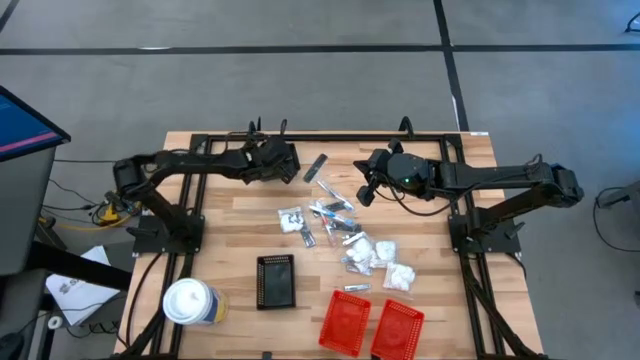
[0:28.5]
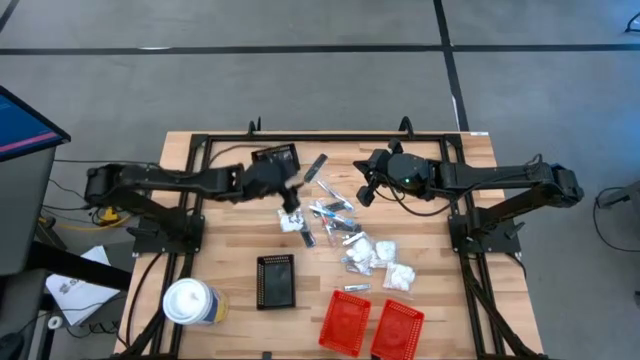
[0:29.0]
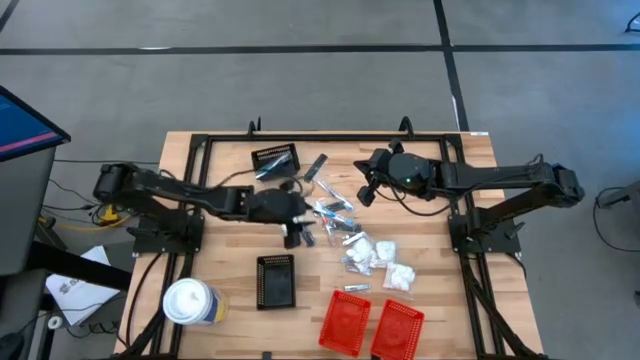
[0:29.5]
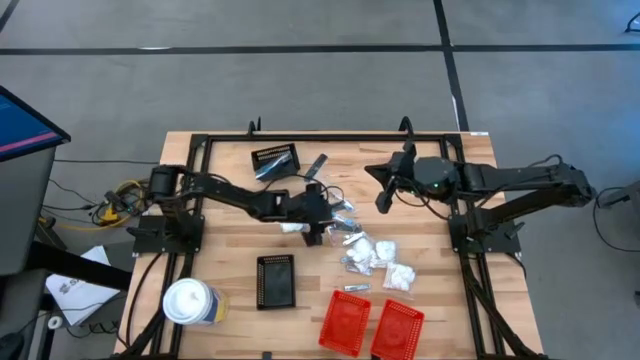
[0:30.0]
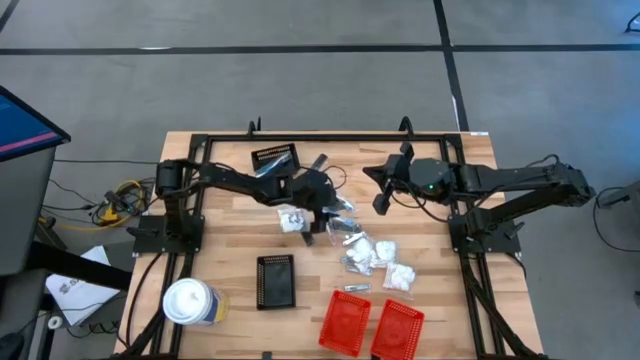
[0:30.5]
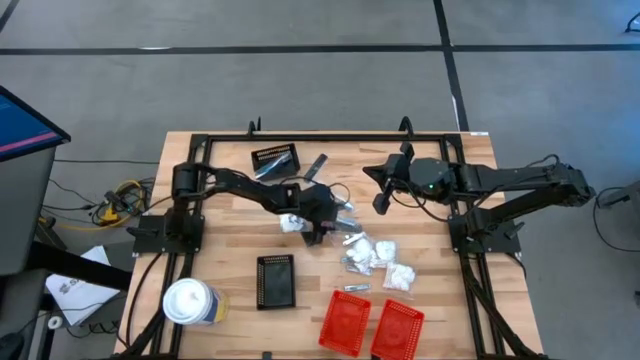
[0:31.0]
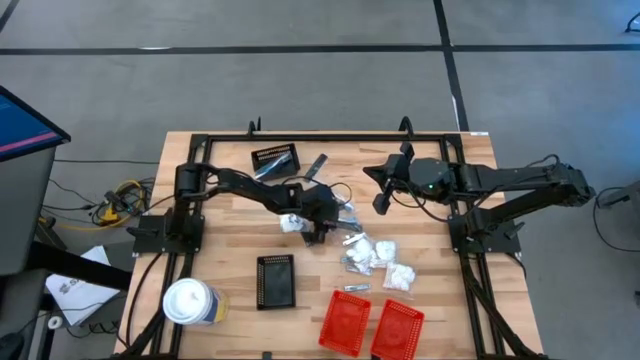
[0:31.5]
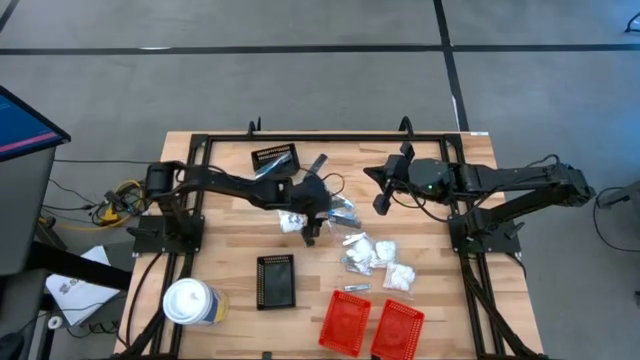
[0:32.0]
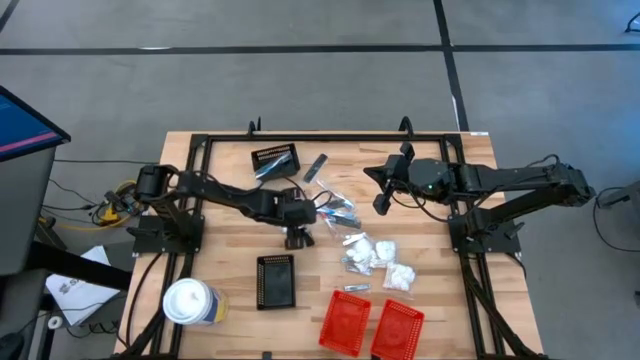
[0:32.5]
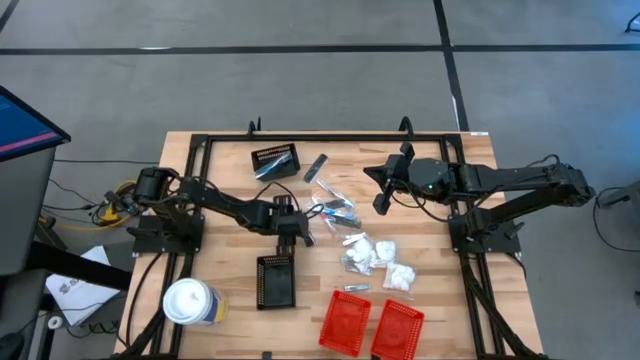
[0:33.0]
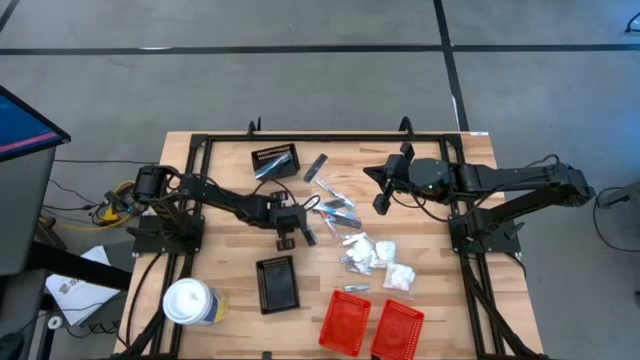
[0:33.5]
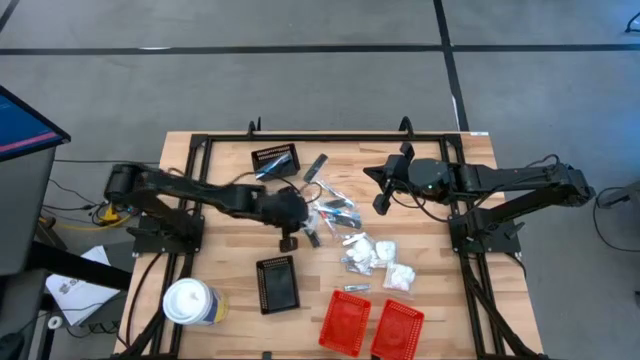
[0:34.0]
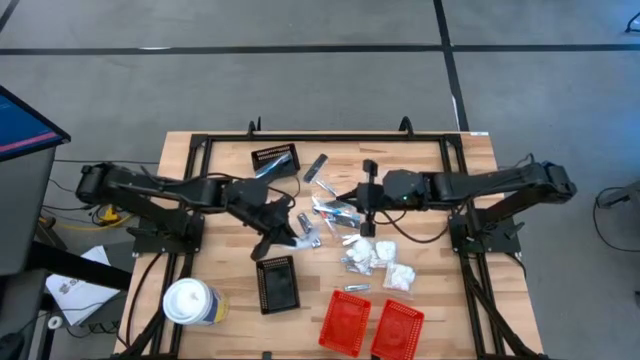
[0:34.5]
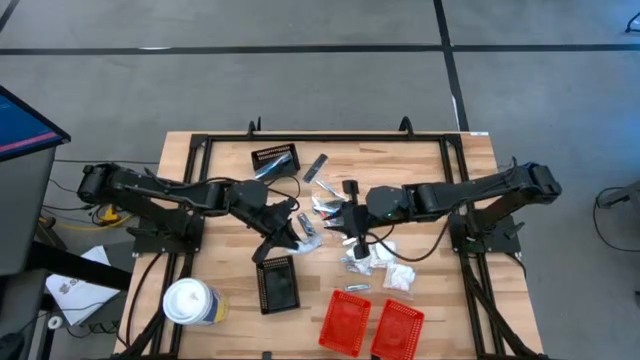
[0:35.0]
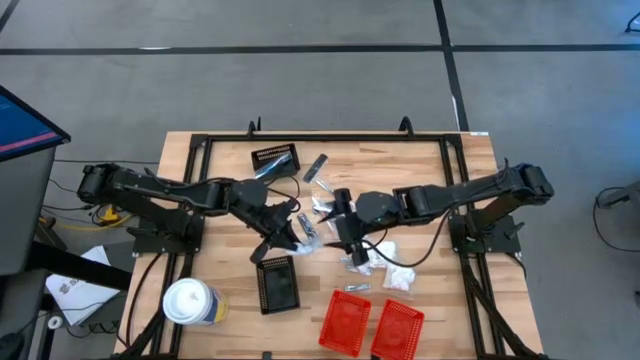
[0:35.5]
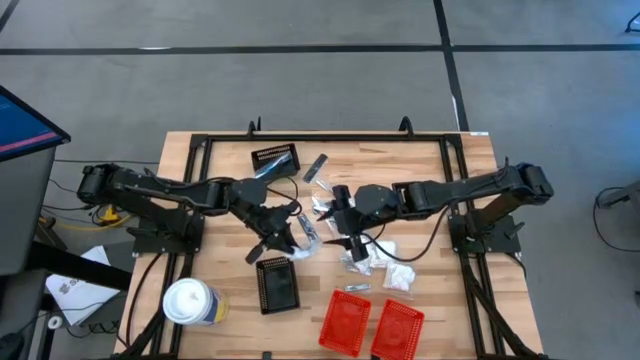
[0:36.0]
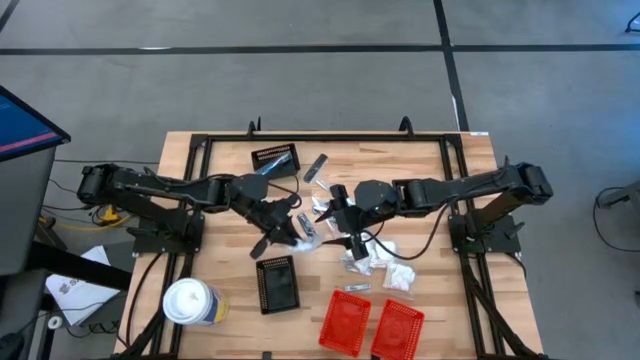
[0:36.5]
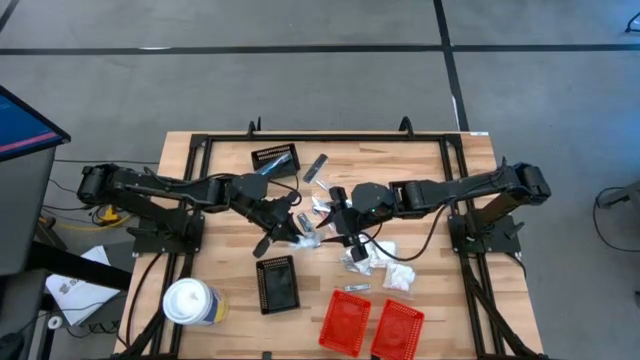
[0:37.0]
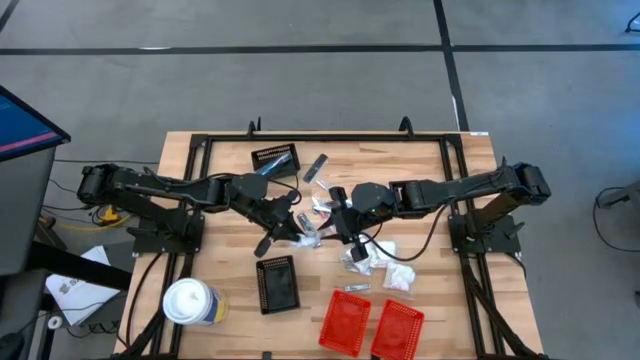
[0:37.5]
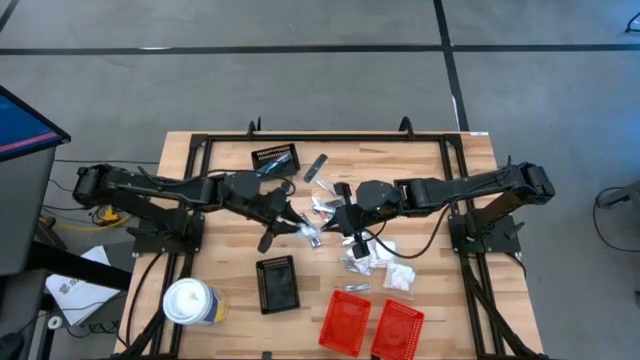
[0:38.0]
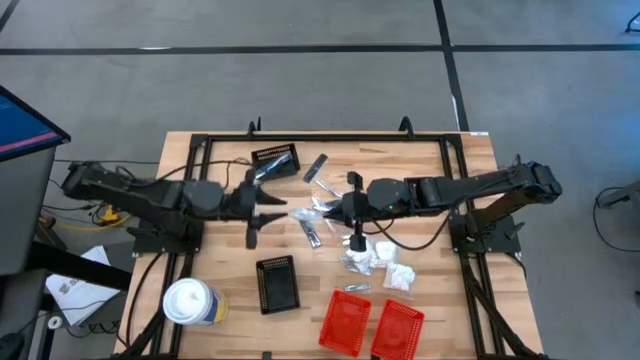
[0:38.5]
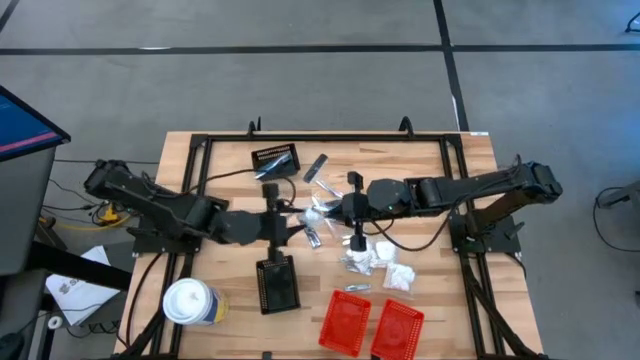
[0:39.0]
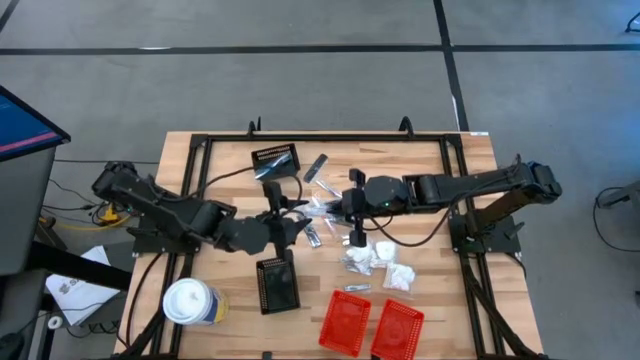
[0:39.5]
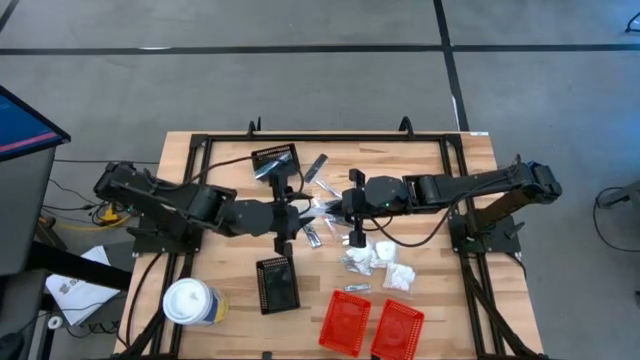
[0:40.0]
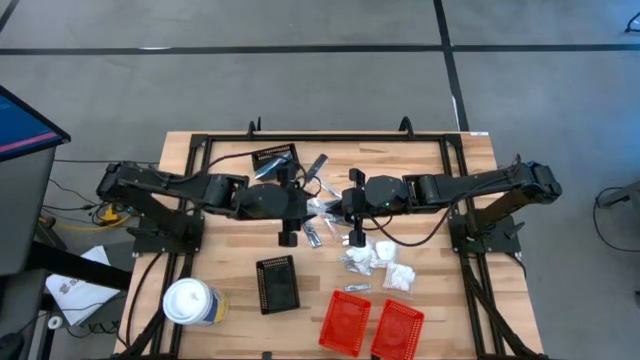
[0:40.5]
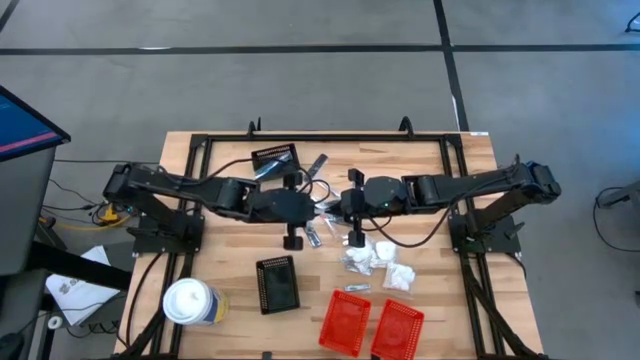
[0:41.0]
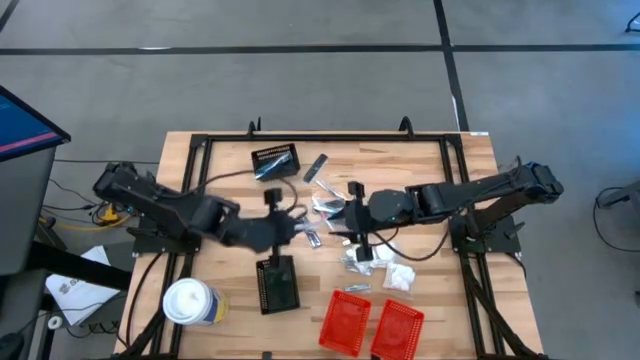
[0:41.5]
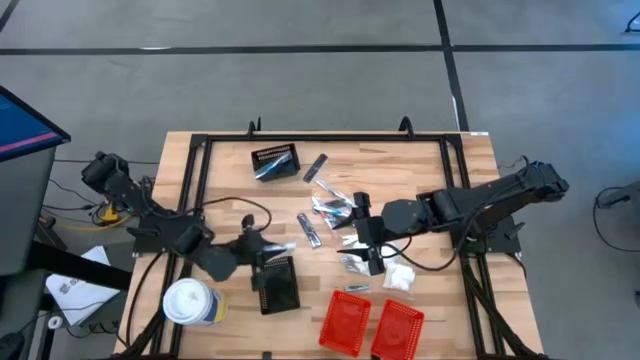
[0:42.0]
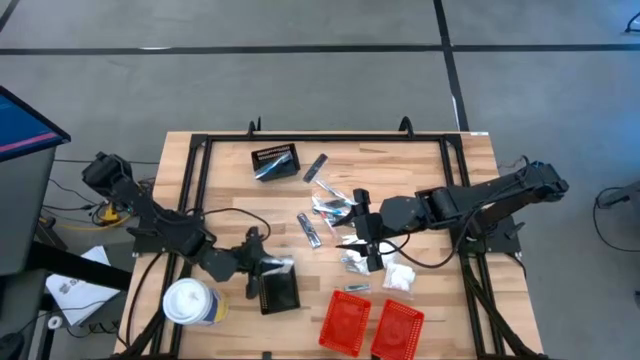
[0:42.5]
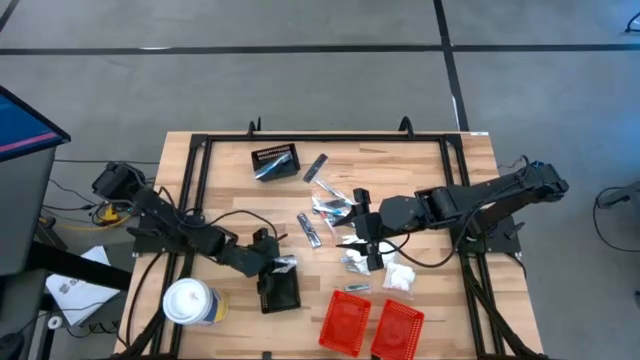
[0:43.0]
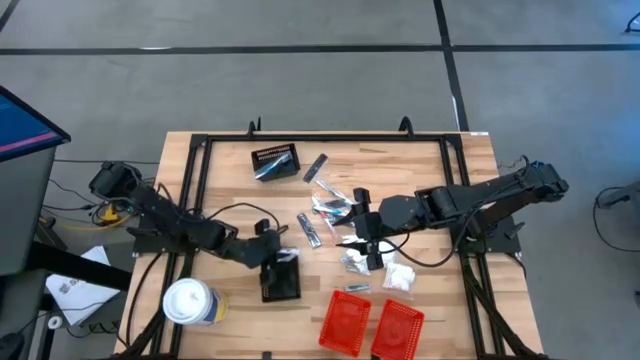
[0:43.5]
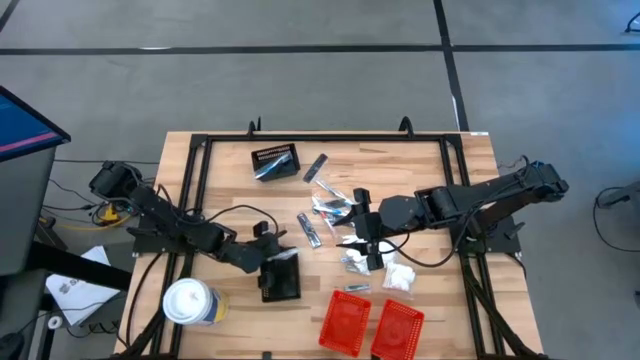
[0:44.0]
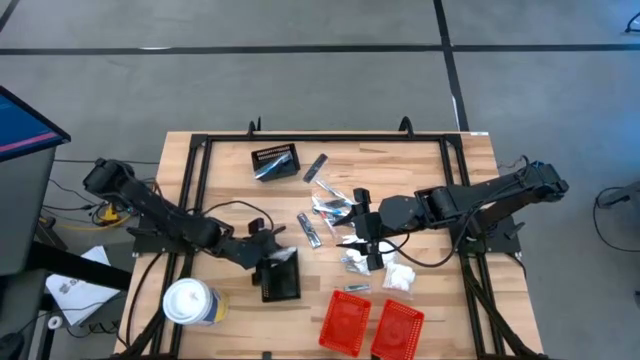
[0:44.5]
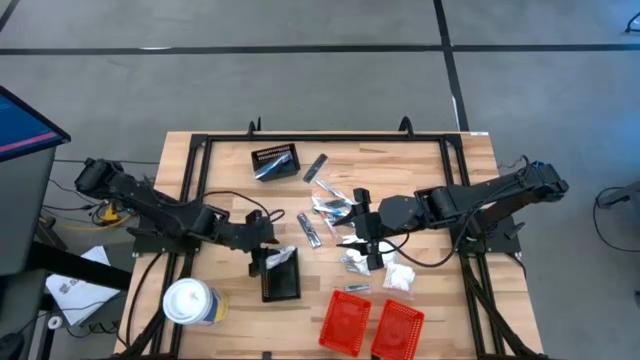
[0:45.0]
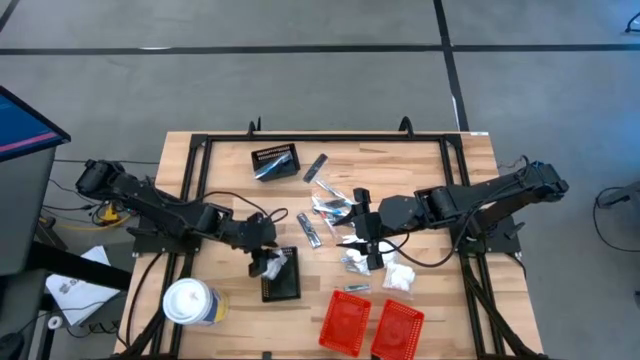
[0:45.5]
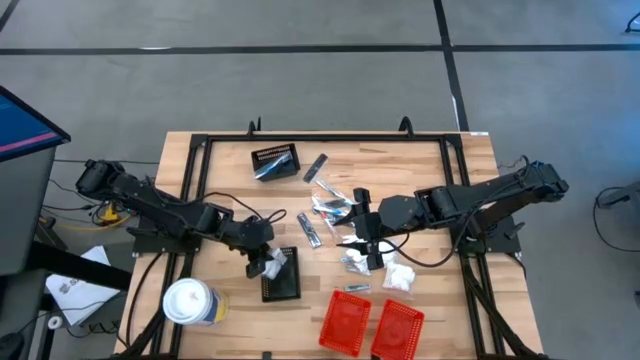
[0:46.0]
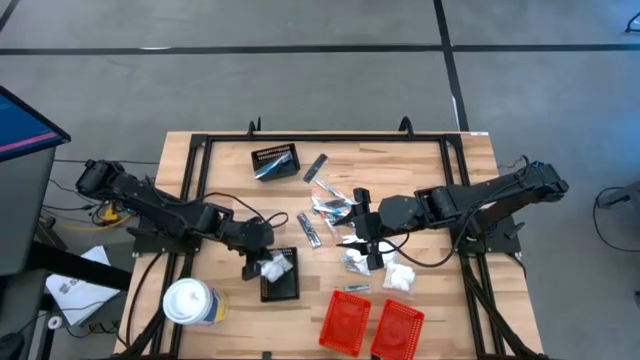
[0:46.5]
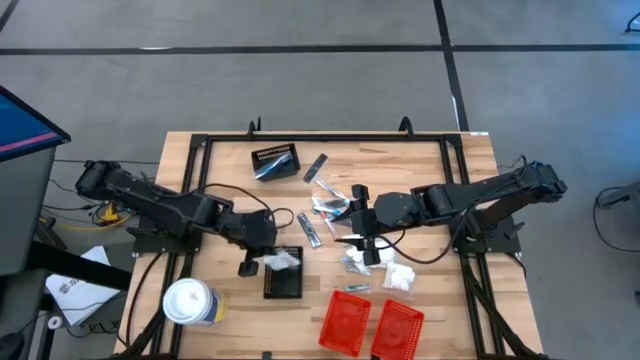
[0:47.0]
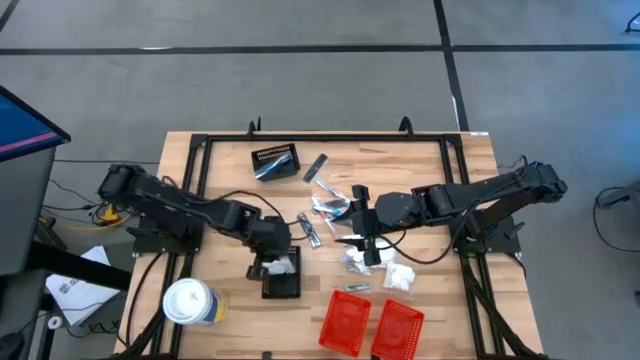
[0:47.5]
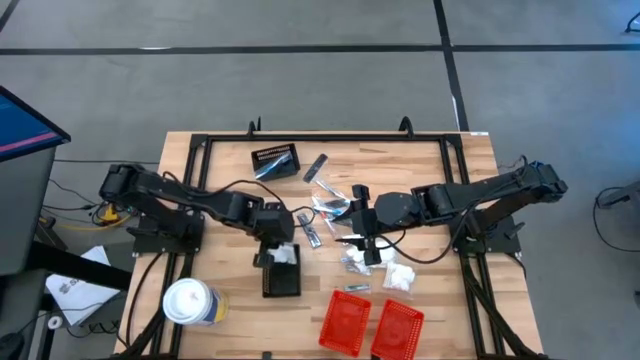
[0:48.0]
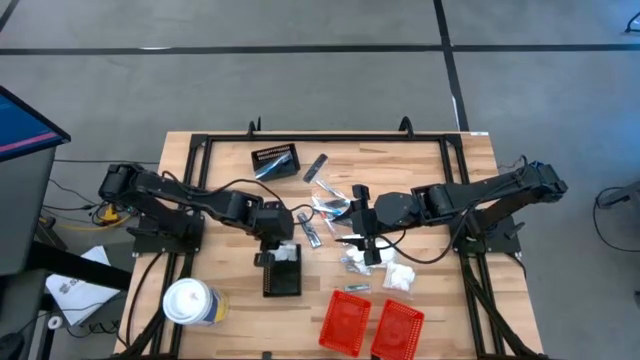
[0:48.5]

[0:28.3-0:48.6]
Task: Pick & Place Travel size toiletries
Put the cotton pack into the bottom black bin
